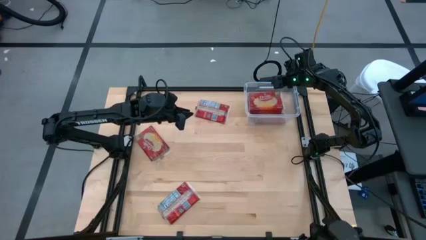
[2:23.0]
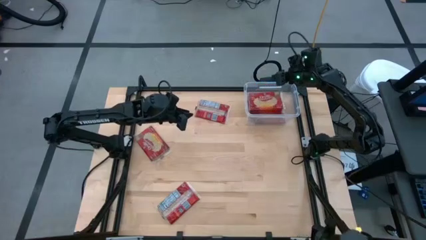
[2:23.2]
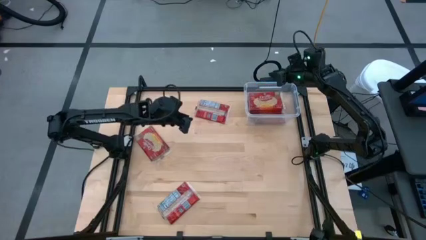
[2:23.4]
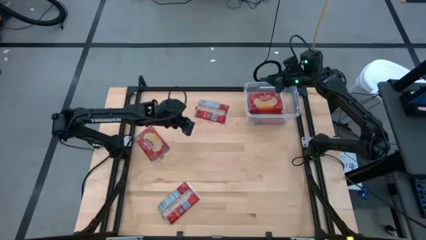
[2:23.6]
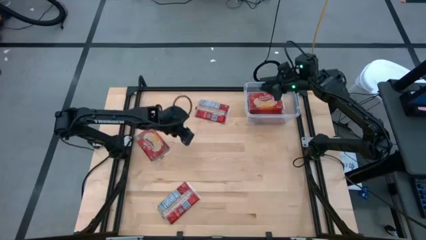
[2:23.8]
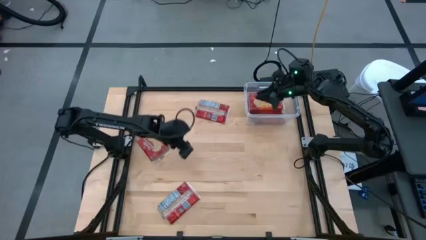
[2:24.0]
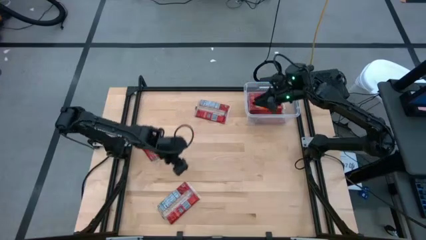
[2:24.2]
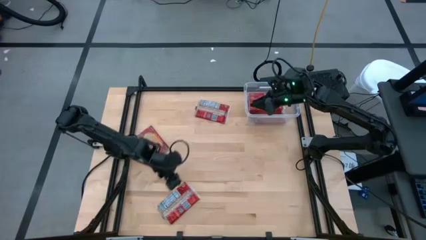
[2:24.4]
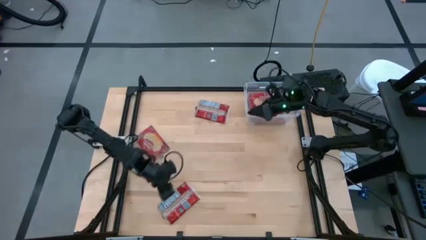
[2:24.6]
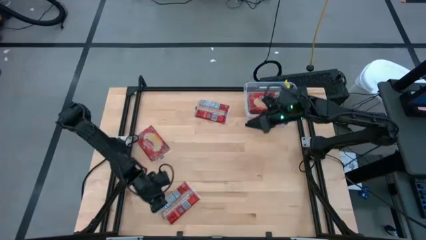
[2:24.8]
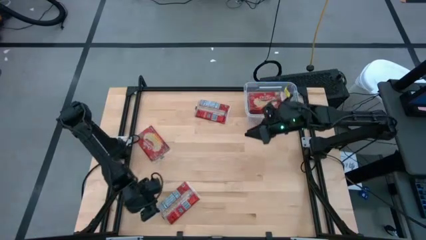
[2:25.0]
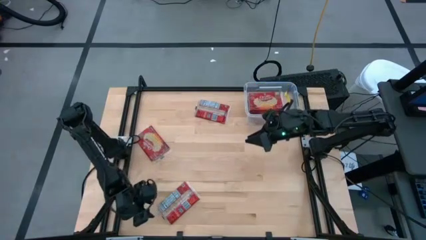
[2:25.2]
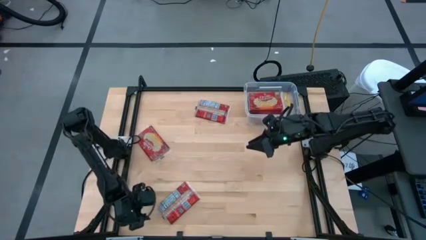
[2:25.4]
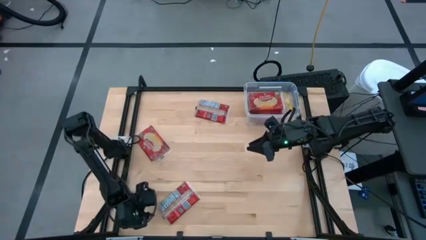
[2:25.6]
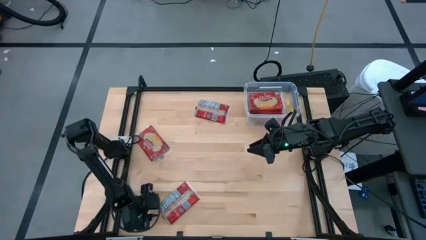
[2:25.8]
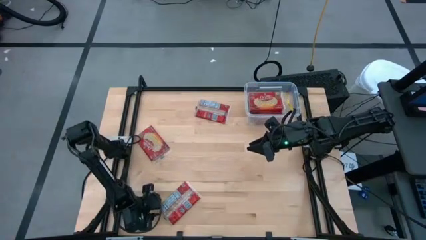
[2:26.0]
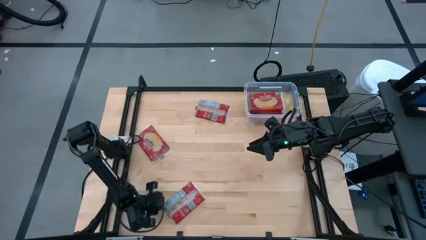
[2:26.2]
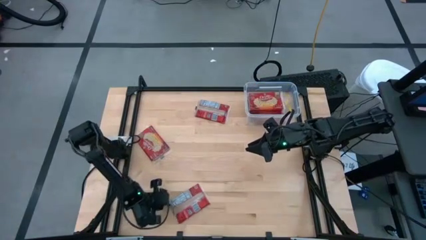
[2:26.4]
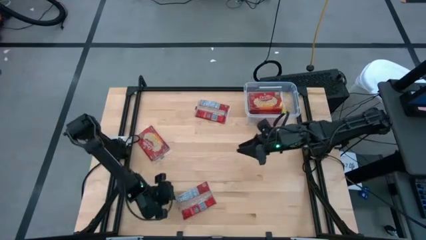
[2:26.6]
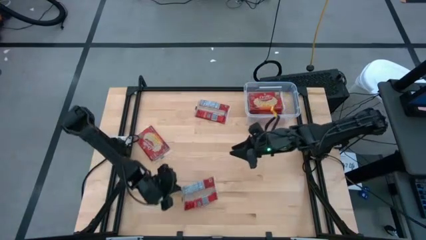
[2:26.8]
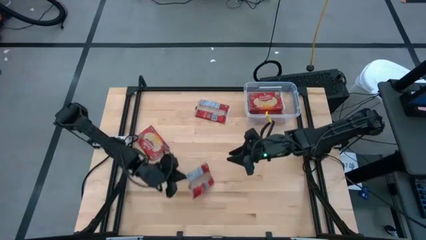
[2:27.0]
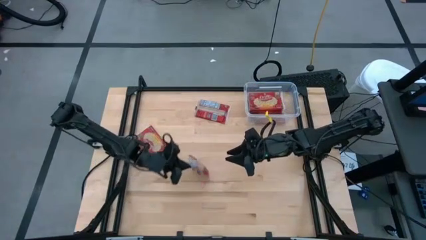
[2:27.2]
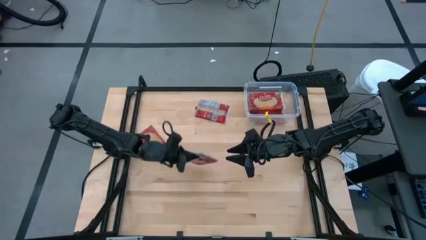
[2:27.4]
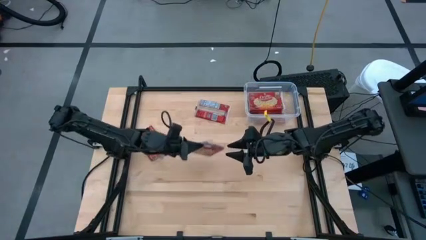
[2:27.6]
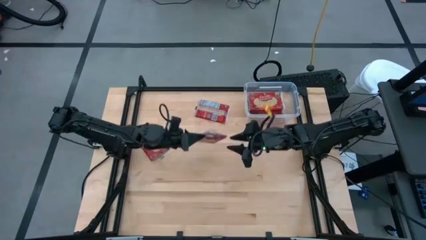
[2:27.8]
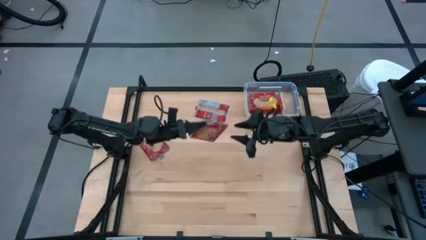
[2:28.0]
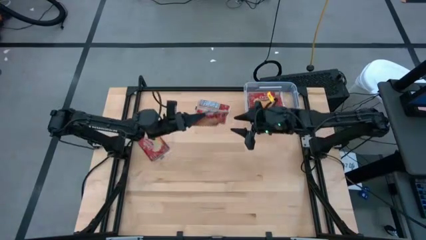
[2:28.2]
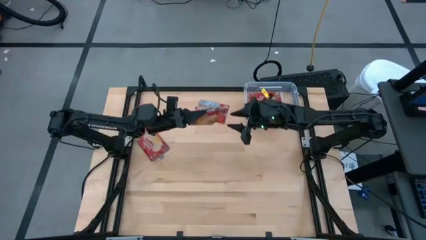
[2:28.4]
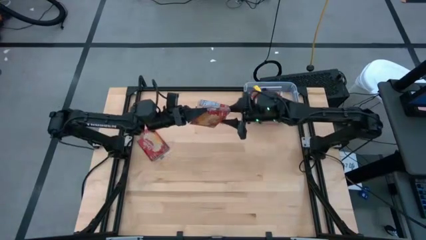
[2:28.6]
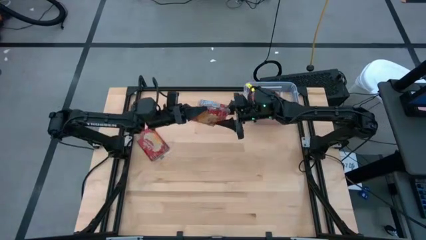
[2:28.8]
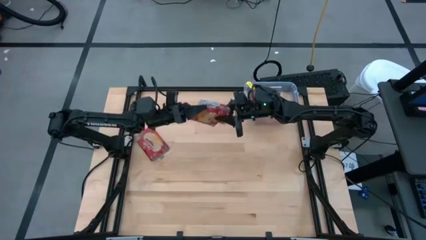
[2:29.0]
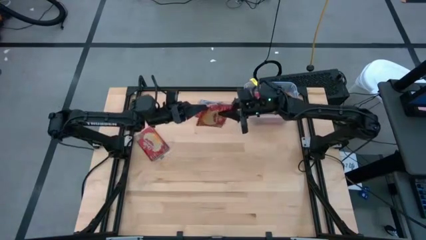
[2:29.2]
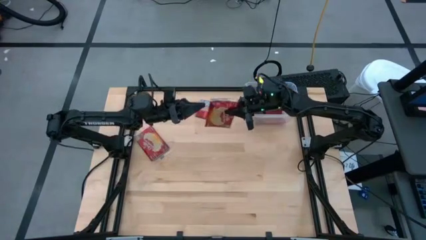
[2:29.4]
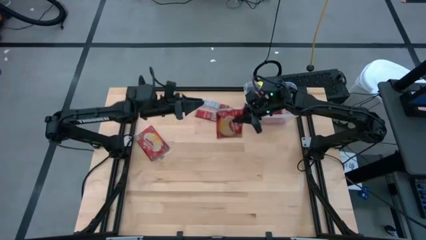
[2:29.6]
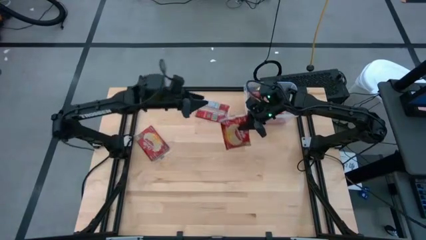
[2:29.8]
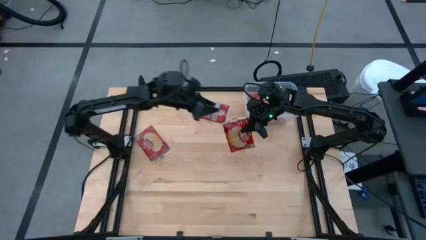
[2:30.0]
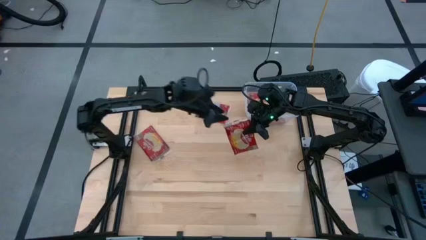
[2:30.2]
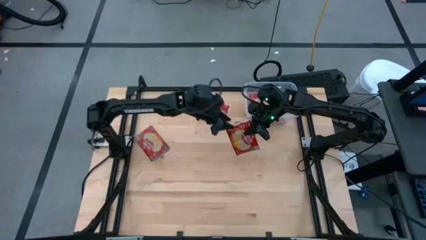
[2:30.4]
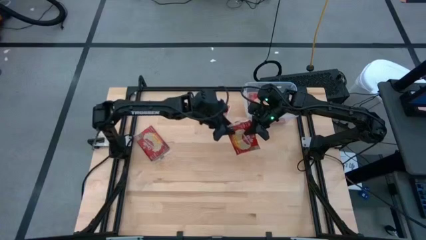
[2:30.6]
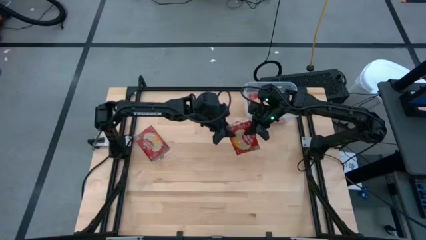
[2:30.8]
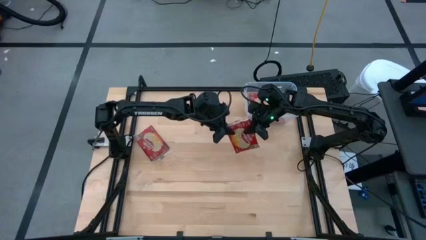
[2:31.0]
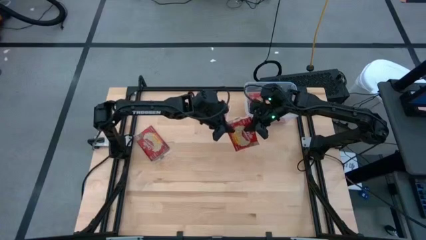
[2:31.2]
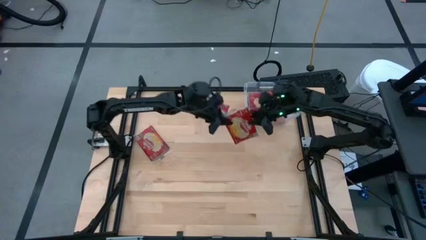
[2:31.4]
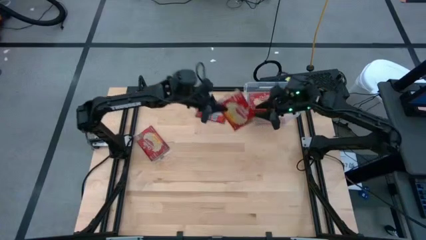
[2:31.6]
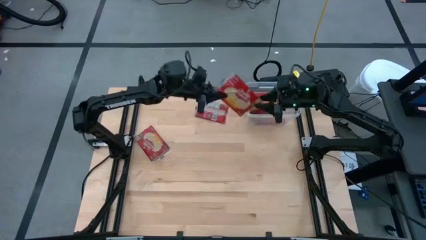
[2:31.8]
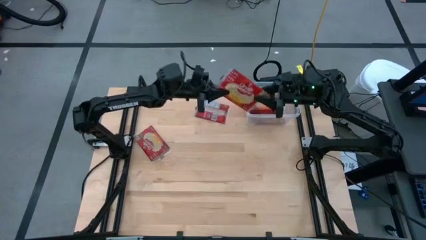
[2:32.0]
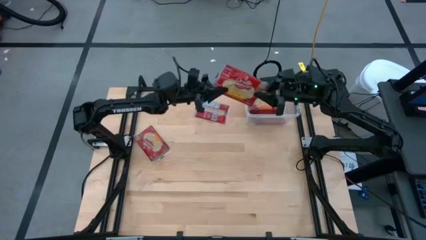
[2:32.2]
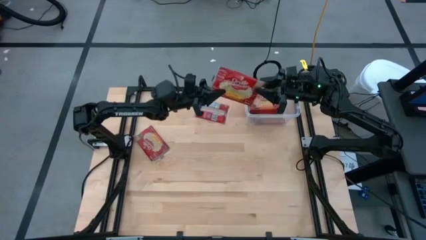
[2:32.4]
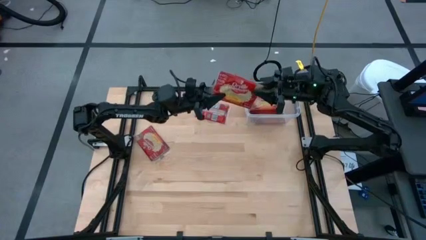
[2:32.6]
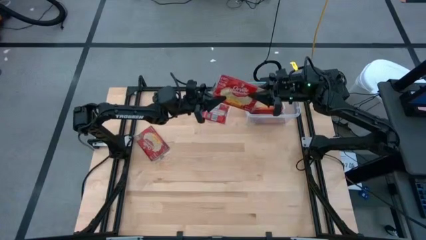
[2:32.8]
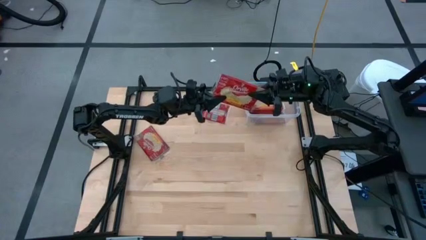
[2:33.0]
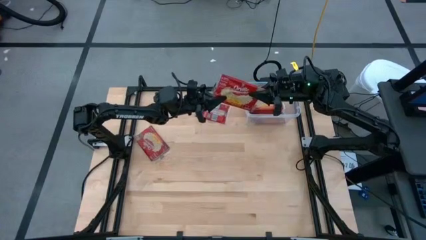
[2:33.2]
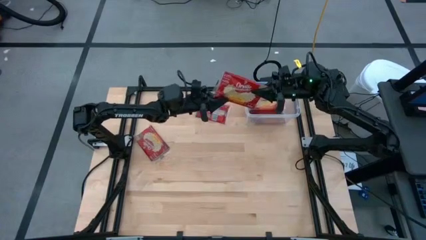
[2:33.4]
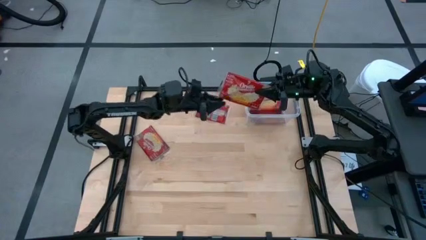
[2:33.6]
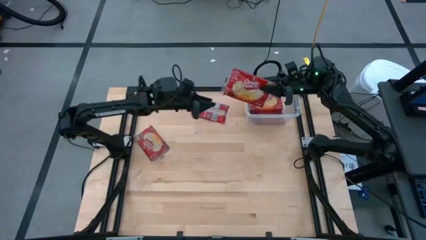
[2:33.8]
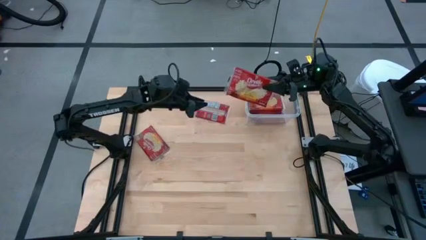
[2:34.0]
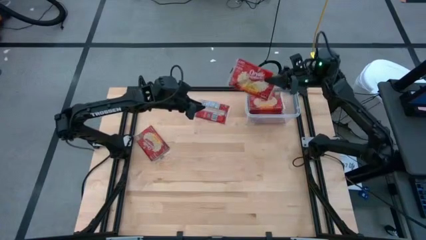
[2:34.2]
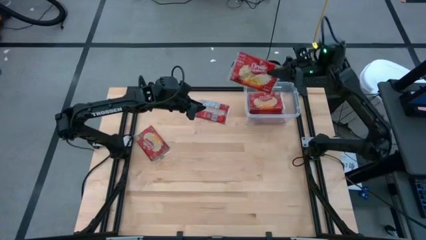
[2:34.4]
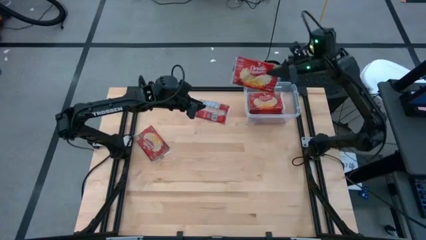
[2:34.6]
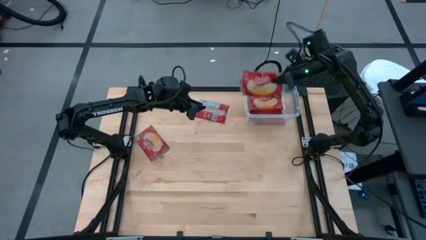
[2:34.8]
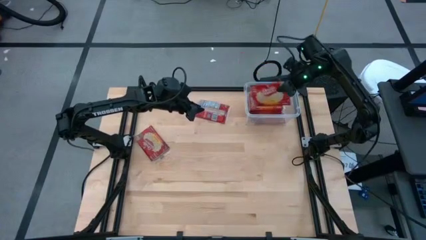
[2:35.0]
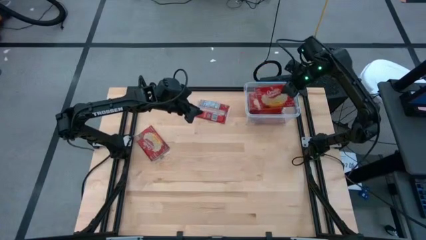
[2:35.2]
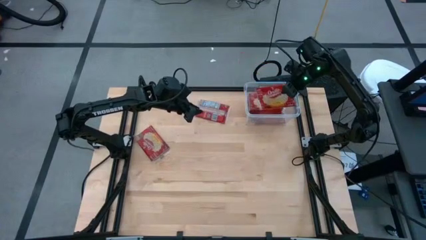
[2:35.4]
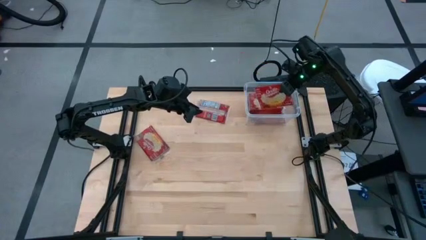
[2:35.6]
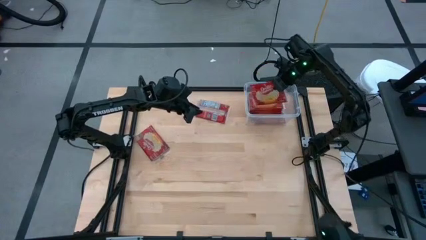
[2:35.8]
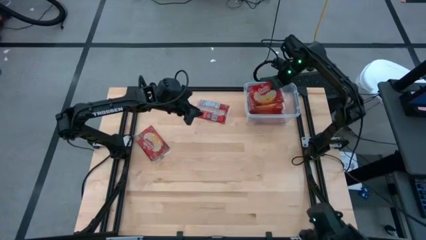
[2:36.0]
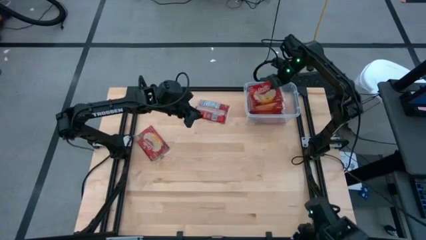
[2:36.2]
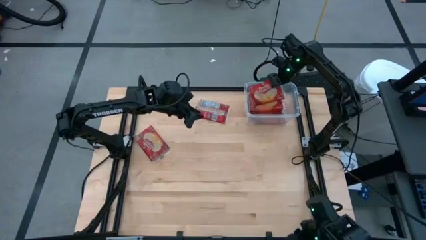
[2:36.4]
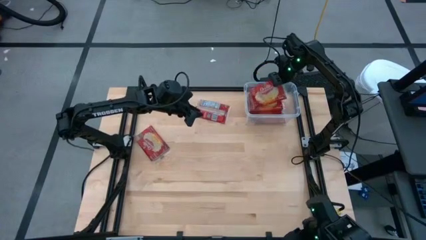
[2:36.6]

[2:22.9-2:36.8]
Task: Sort popcorn bags into baskets
Put the popcorn bag into the transparent container
